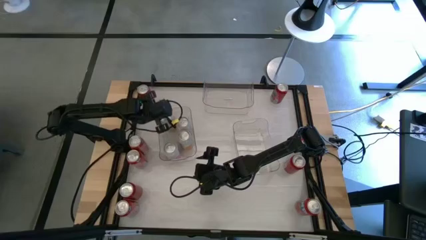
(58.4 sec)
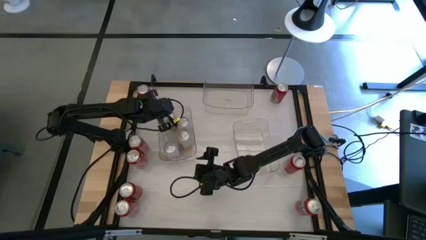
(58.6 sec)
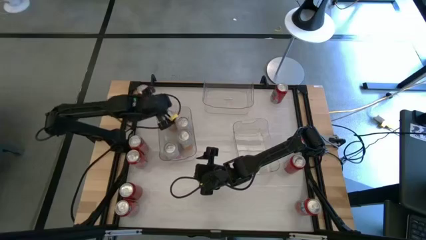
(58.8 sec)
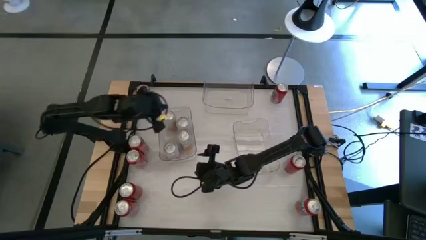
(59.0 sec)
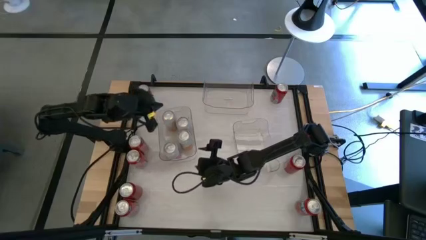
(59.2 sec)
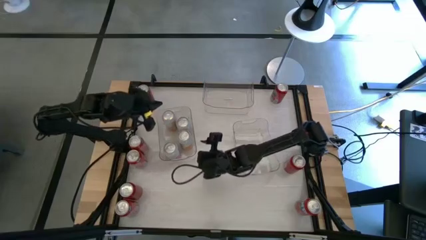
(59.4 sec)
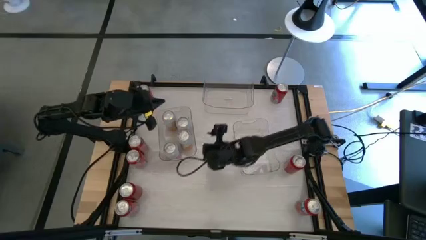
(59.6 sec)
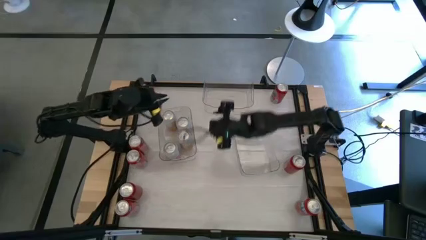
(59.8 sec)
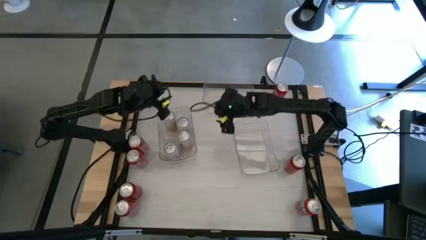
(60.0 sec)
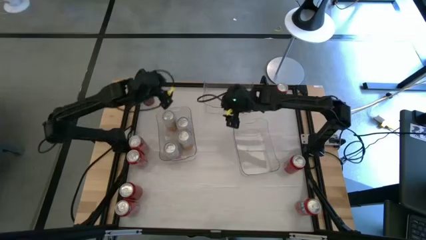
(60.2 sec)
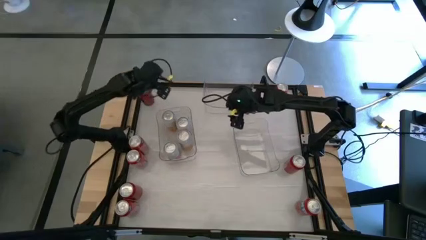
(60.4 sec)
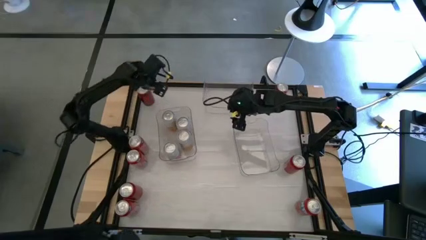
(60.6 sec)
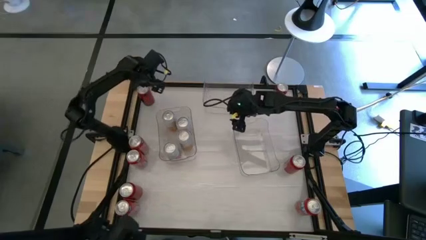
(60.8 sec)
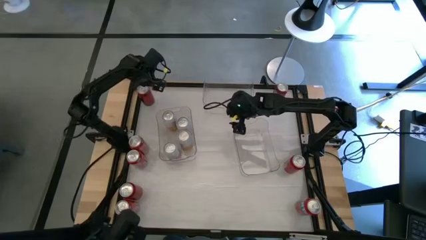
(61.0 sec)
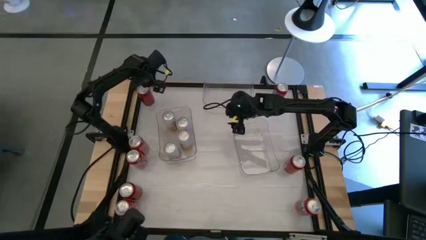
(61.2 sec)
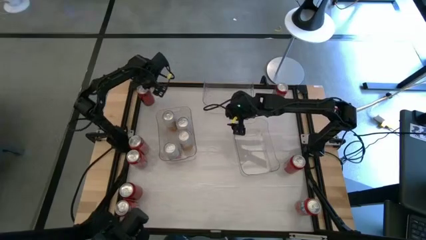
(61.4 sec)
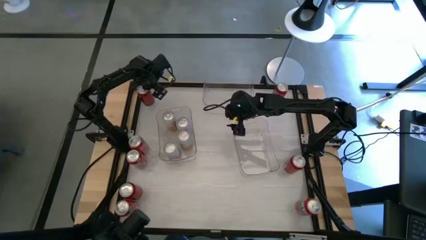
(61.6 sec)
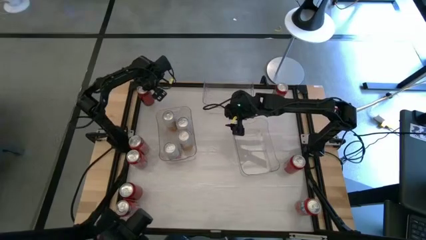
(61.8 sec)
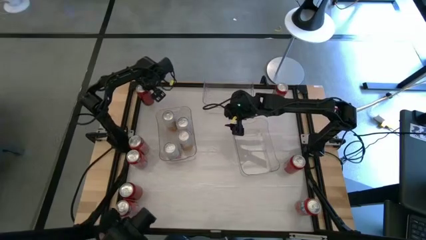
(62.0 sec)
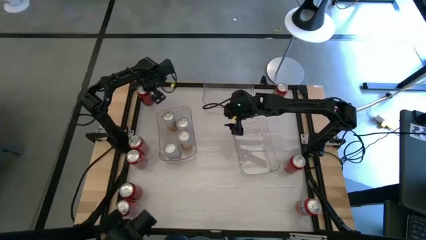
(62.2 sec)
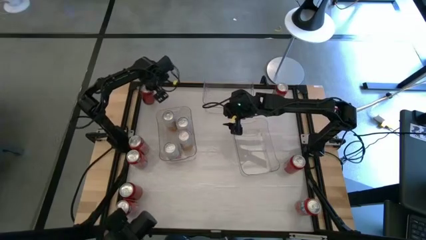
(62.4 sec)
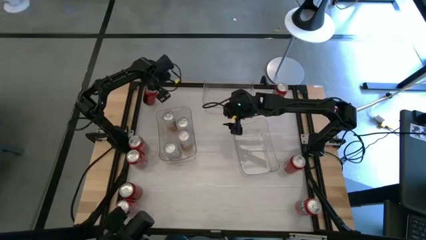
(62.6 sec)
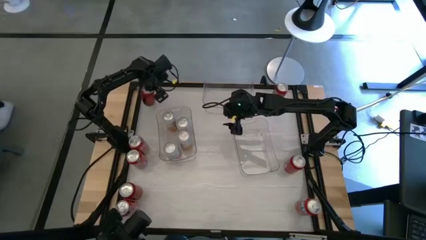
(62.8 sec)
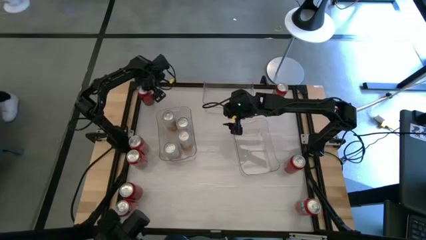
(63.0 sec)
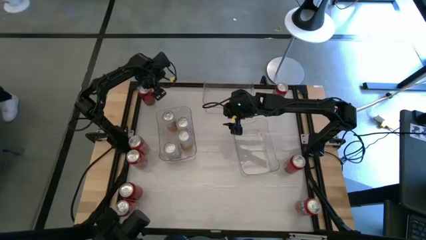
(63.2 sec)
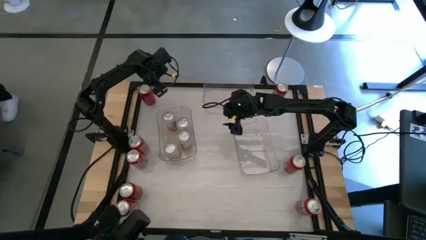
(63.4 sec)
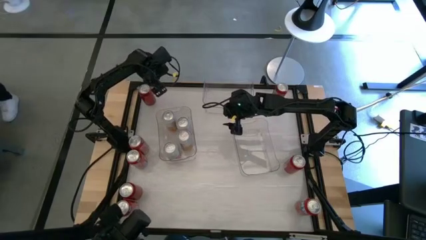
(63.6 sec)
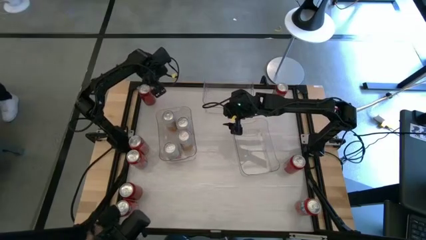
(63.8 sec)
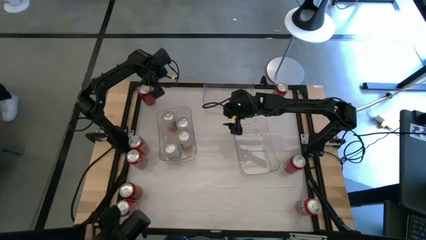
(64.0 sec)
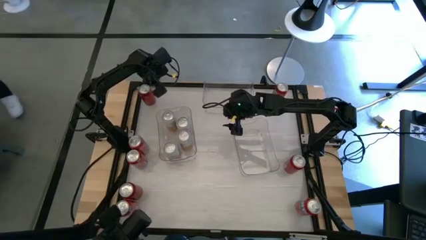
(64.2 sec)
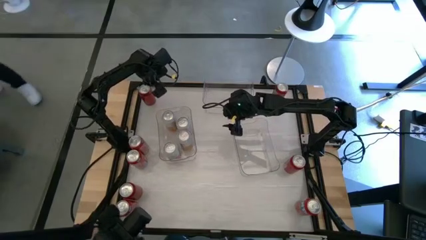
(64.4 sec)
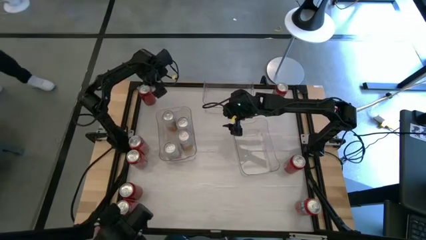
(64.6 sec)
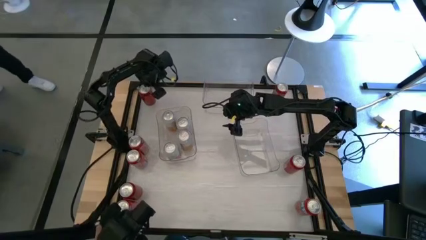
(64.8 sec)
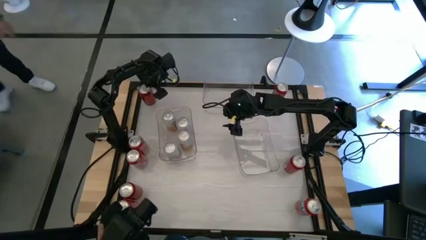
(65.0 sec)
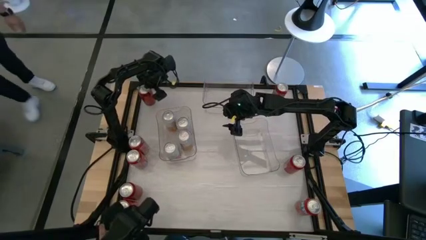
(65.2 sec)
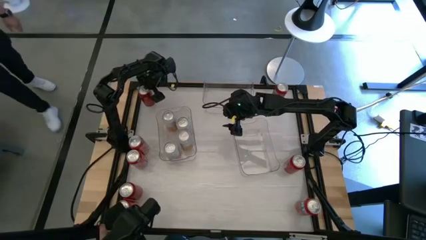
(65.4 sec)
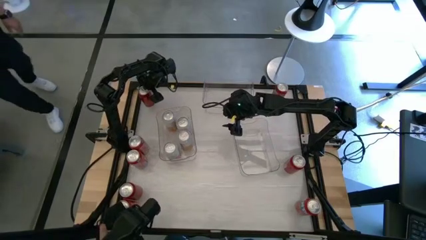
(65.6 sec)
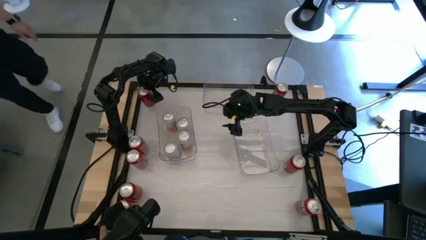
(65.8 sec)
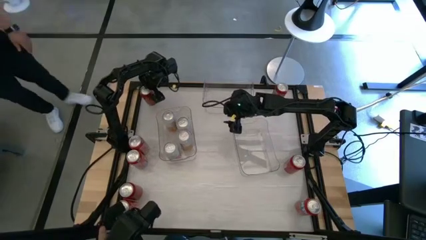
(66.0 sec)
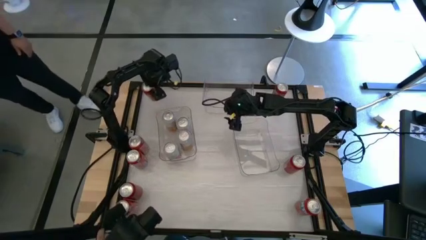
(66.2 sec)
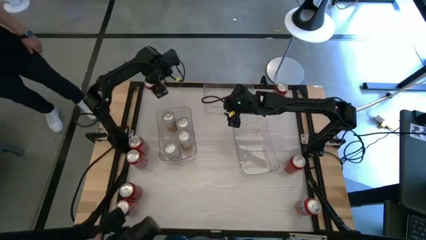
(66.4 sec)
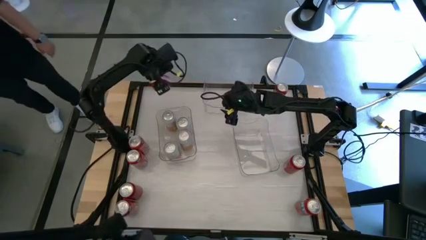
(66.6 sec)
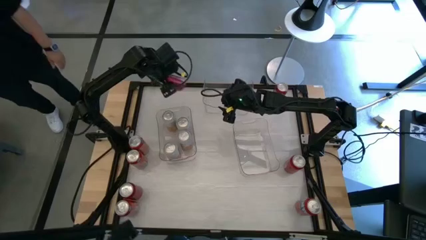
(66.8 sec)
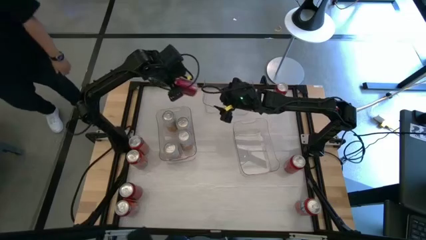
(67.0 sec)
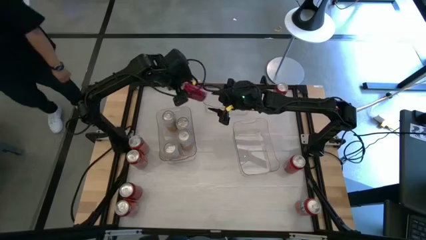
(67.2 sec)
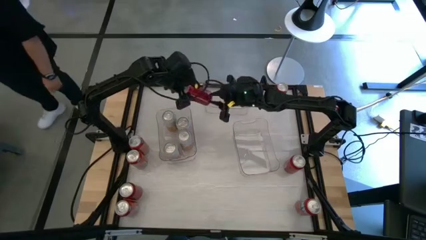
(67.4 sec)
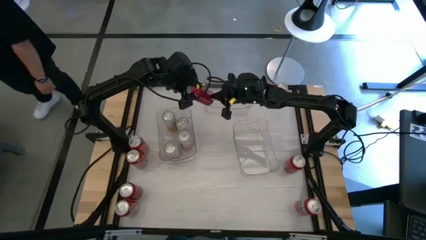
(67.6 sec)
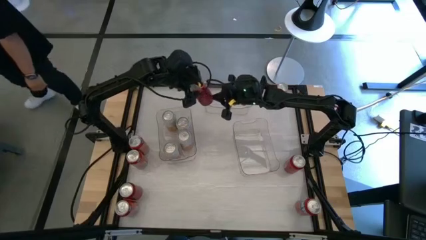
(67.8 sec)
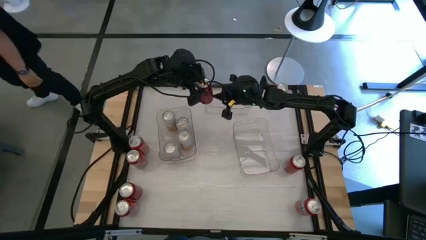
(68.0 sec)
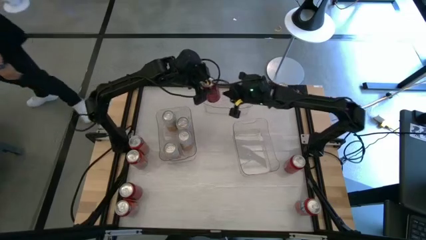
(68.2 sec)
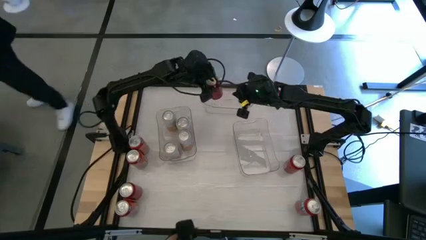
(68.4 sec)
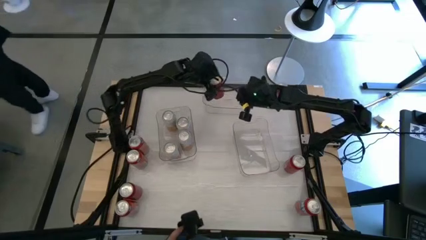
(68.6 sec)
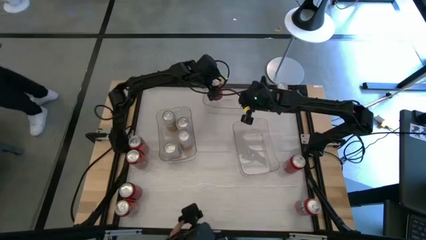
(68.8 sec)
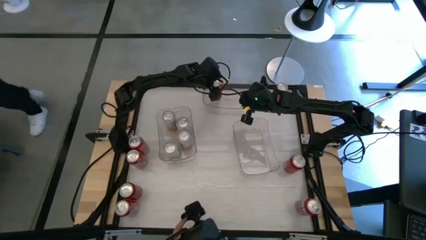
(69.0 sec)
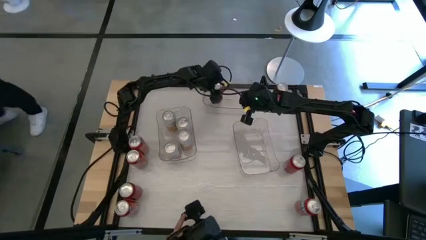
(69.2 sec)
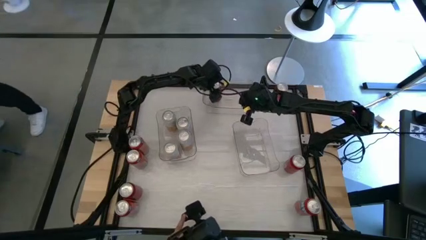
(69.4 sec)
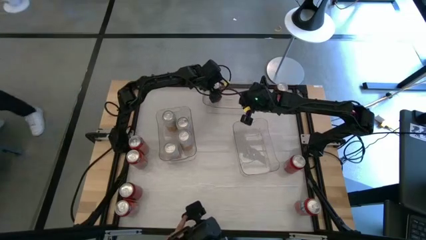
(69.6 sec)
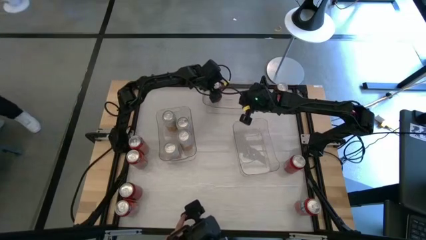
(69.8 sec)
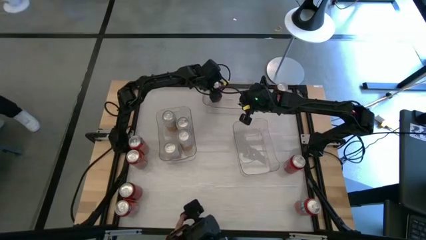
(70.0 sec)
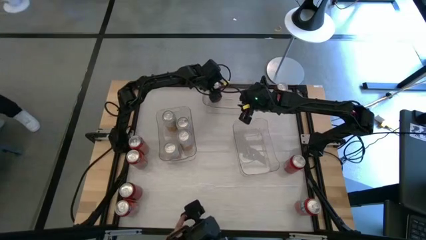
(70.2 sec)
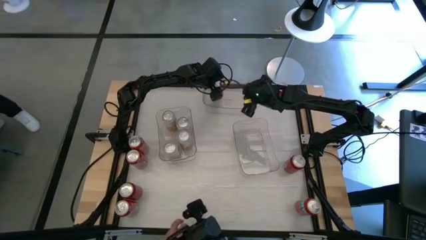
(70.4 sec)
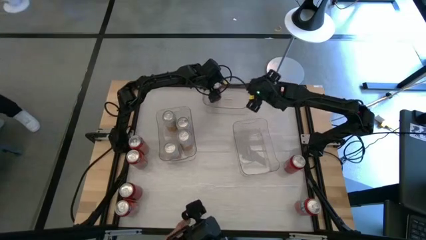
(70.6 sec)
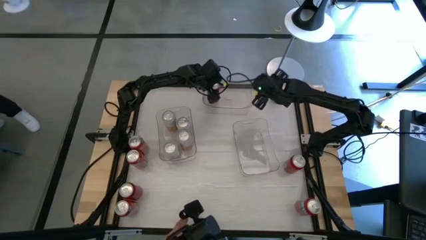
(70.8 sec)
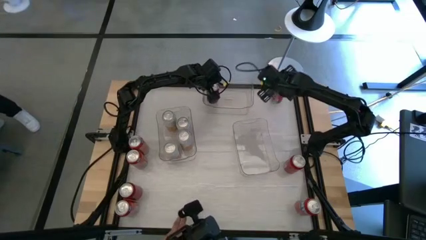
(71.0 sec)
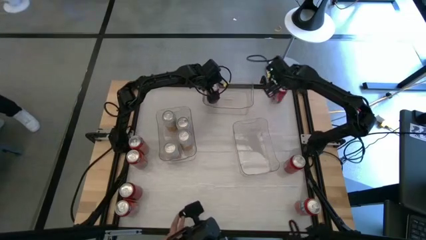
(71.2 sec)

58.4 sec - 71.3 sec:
Task: Sort soda cans
Put the top left red black soda can into the middle transparent bin

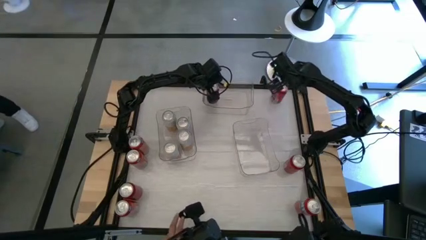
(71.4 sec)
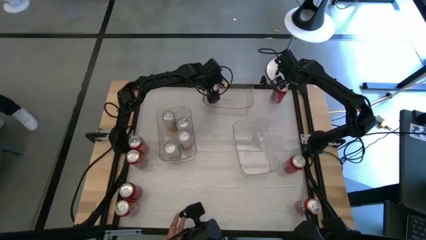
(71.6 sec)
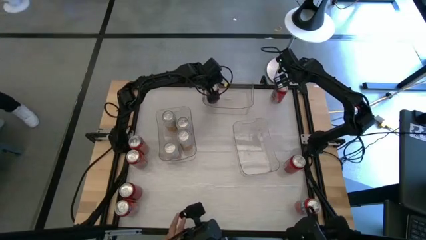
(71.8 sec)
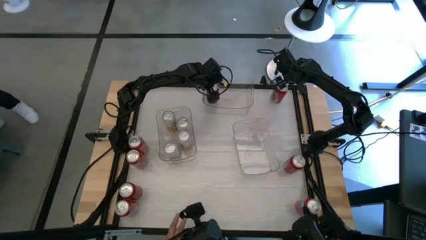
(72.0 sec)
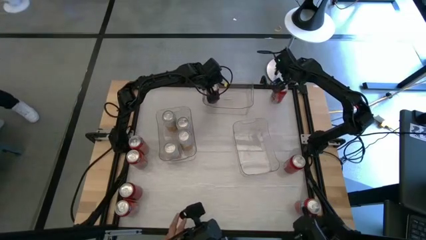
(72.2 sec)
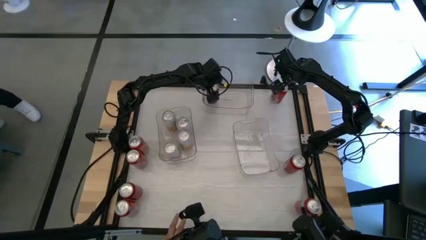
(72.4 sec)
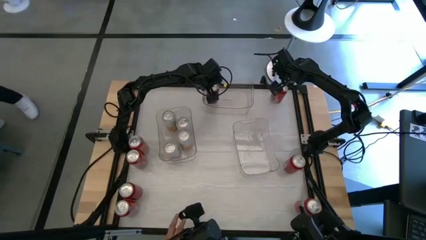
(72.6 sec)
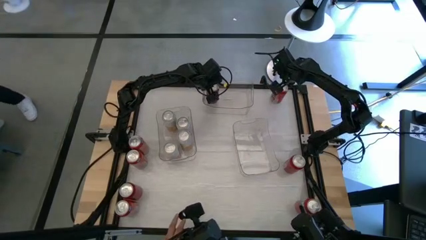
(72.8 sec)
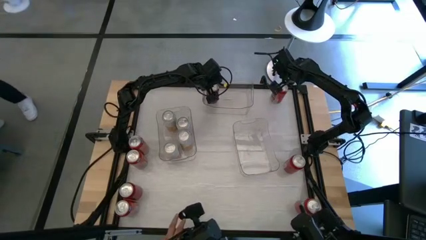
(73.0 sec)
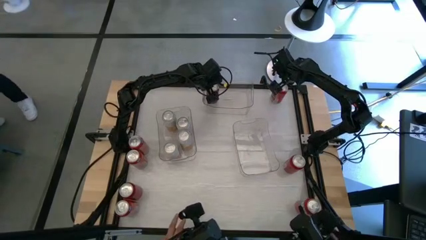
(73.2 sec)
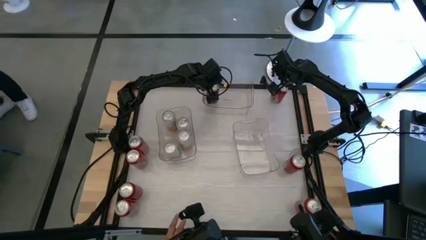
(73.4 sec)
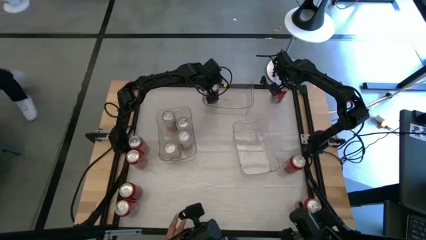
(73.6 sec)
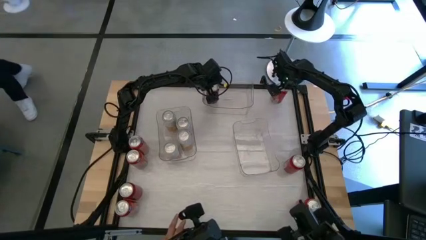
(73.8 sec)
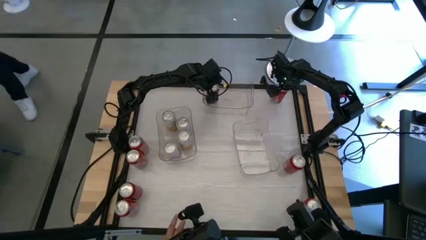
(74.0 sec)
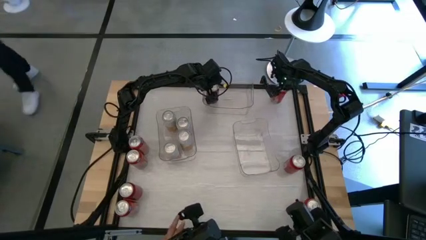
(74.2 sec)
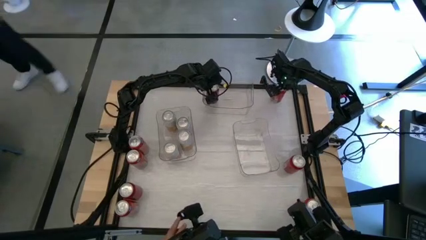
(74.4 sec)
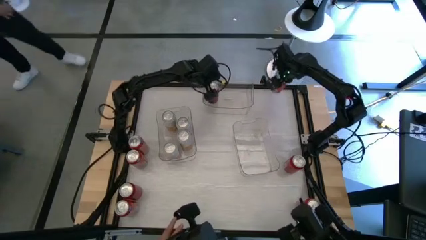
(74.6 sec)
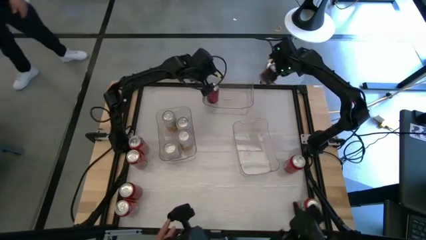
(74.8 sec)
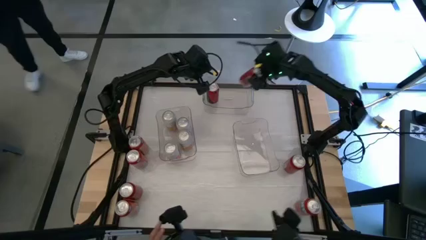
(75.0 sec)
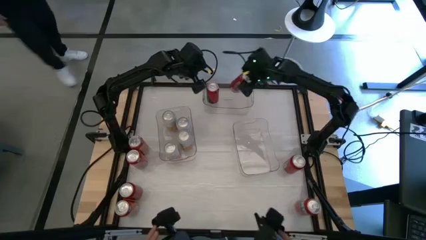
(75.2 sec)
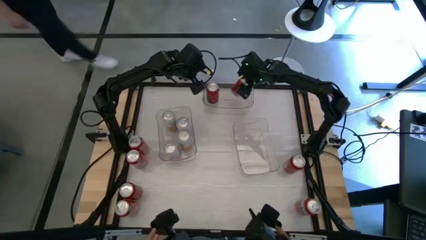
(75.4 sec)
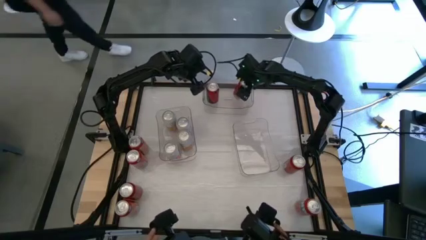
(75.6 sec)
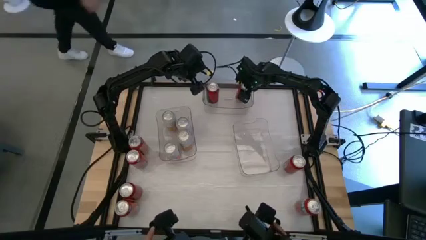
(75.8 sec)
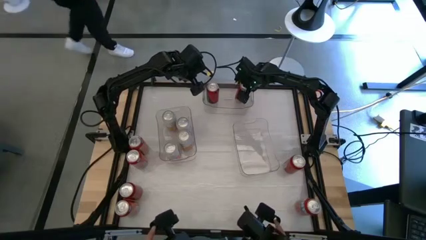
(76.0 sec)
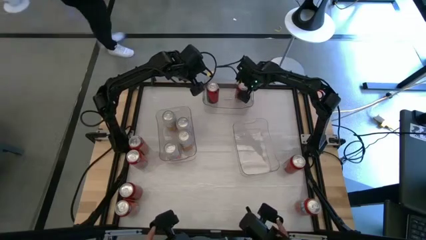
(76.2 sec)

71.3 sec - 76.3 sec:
Put the top right red black soda can into the middle transparent bin
